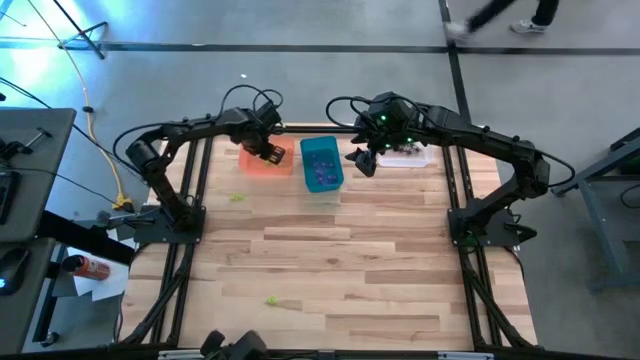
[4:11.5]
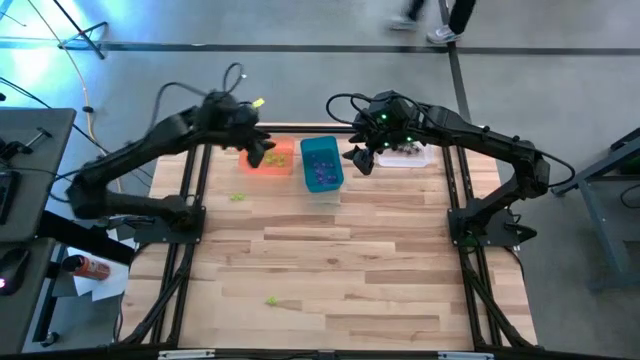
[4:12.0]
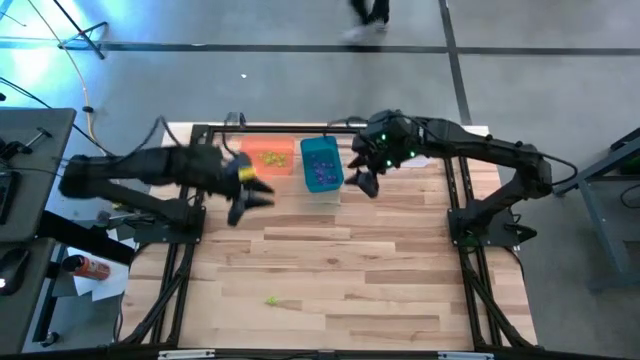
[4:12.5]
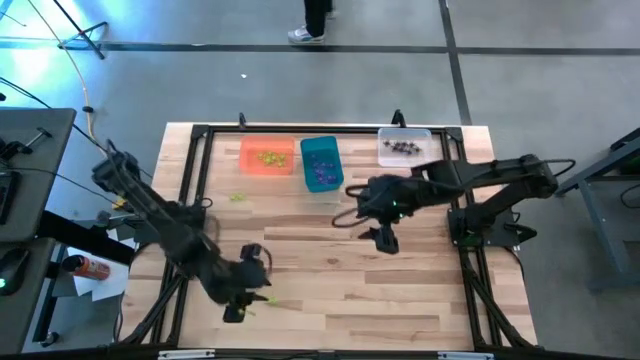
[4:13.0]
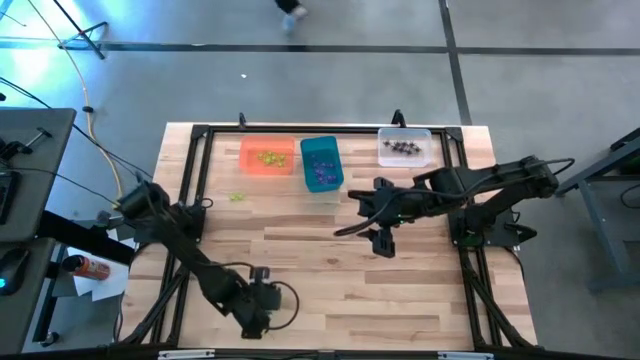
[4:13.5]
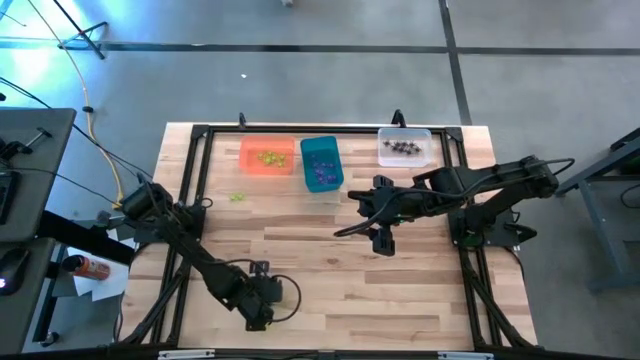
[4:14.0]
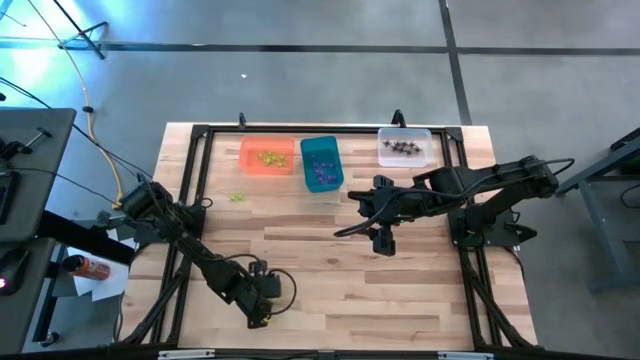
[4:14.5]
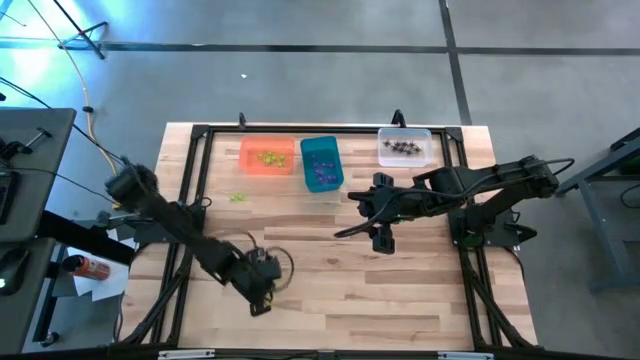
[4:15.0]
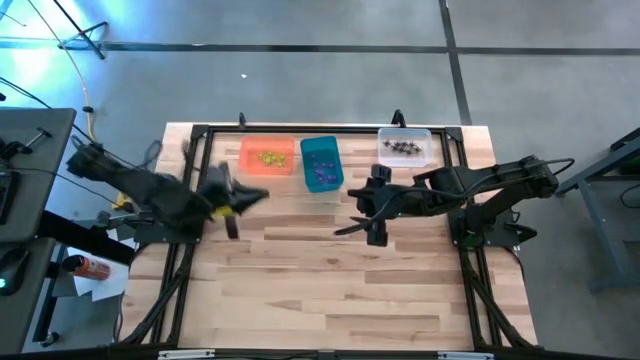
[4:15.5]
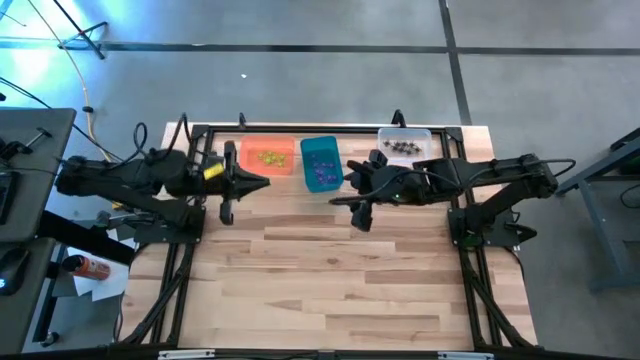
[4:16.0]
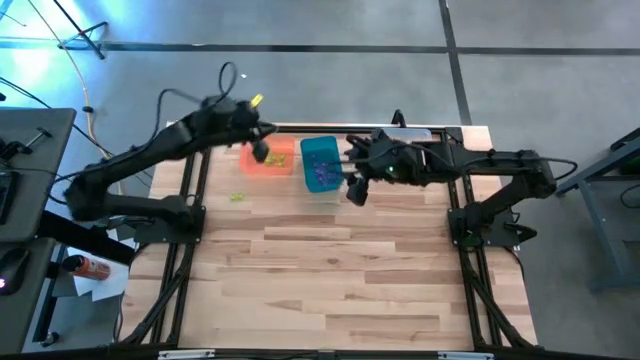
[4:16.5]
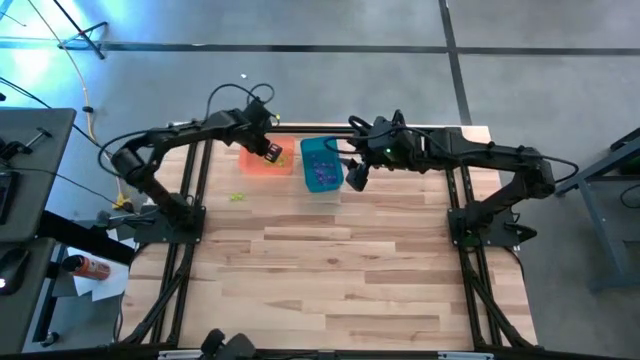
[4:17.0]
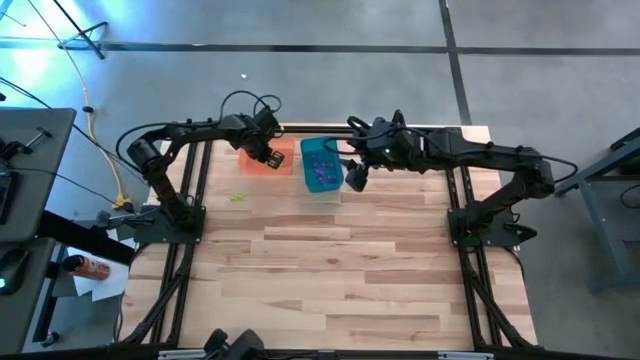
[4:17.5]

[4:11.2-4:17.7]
Task: Sort Halloween decoration
Put the green spider toy into the orange bin

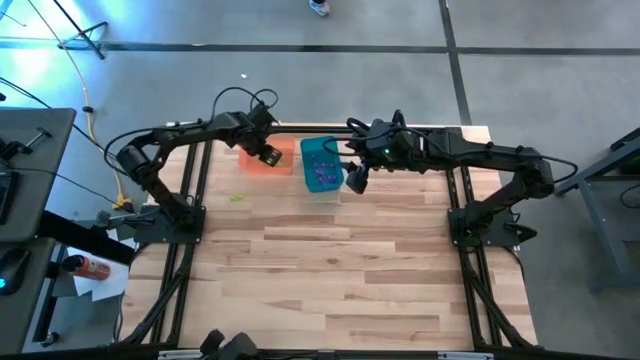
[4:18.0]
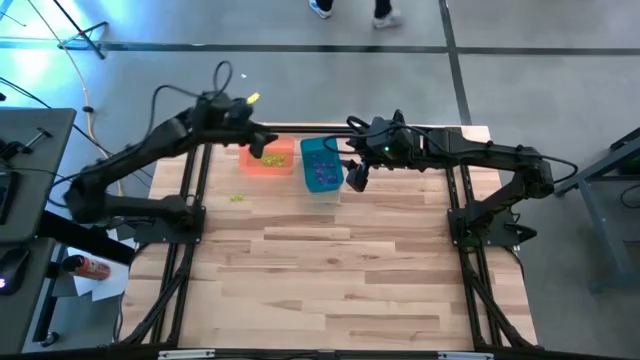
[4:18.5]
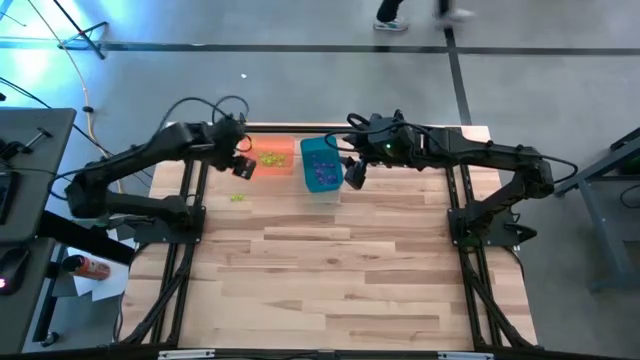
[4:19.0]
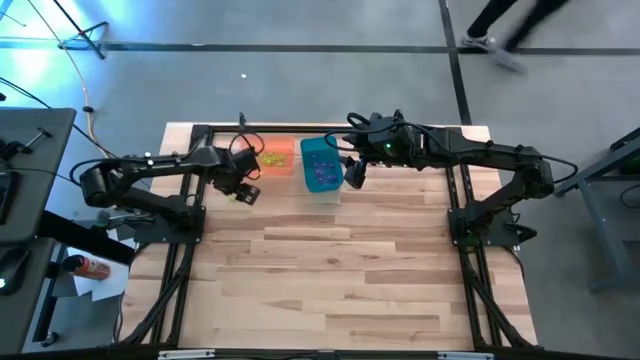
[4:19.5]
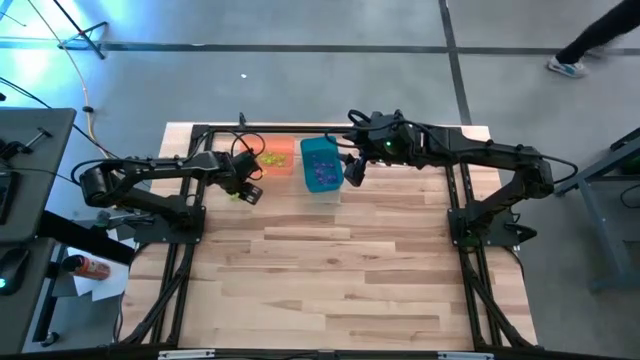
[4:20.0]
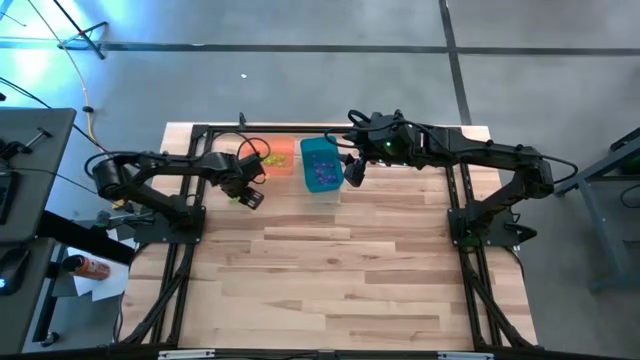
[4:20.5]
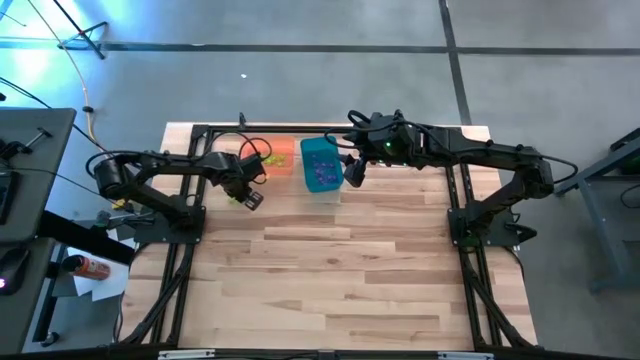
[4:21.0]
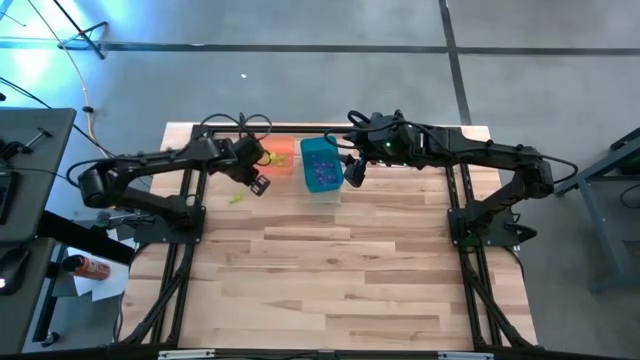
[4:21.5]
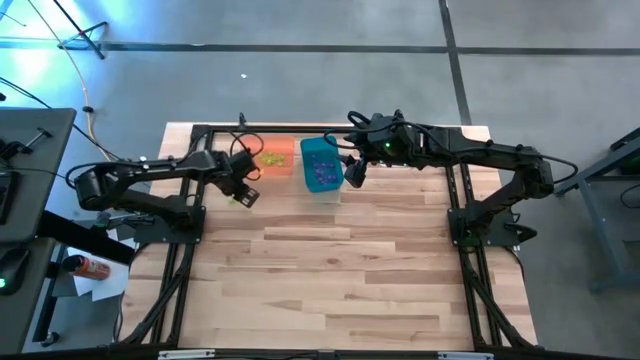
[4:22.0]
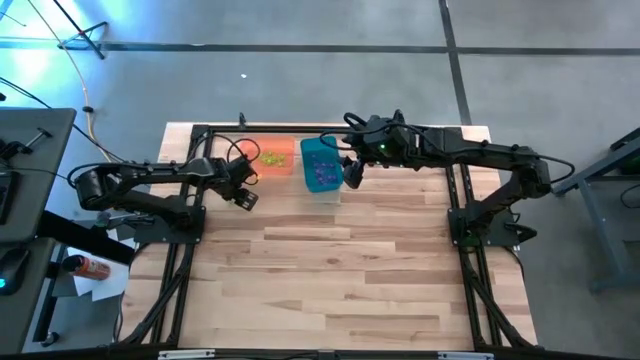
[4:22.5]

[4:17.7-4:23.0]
Put the green spider toy into the orange bin

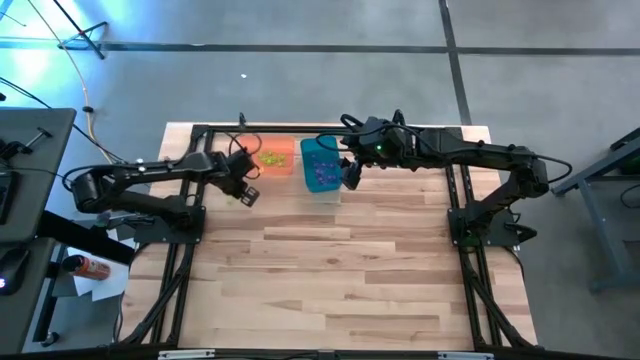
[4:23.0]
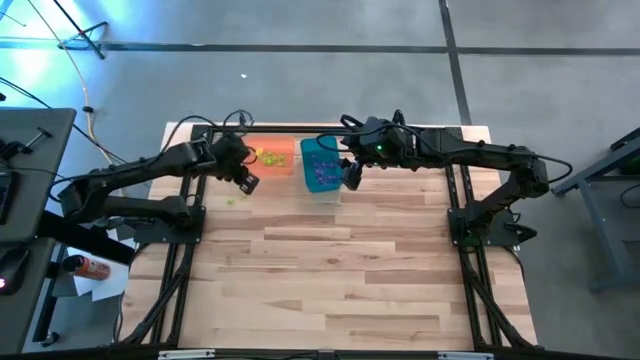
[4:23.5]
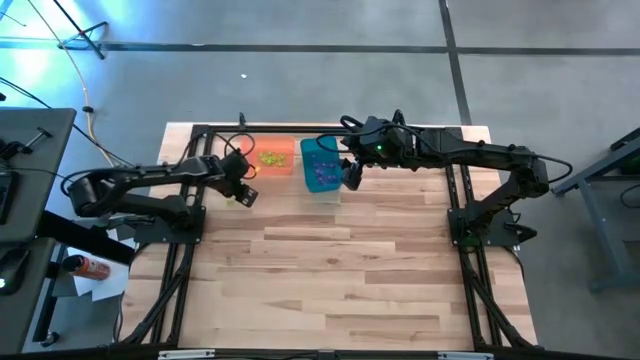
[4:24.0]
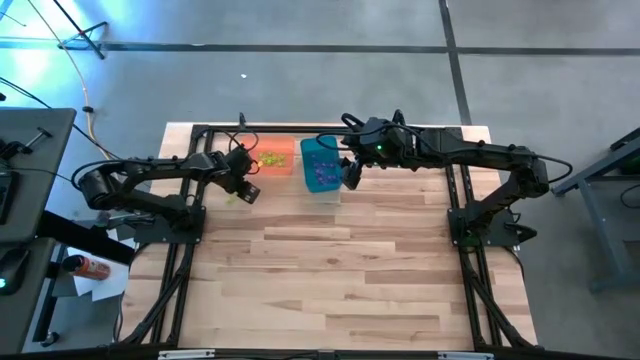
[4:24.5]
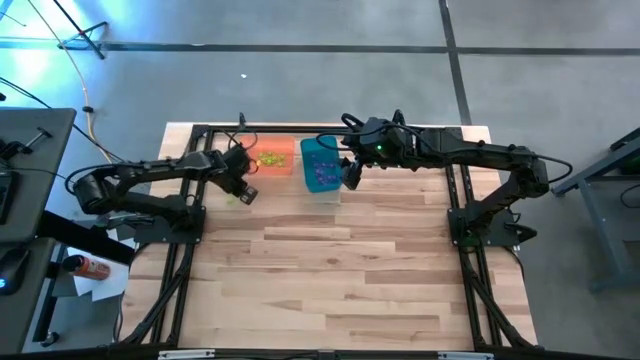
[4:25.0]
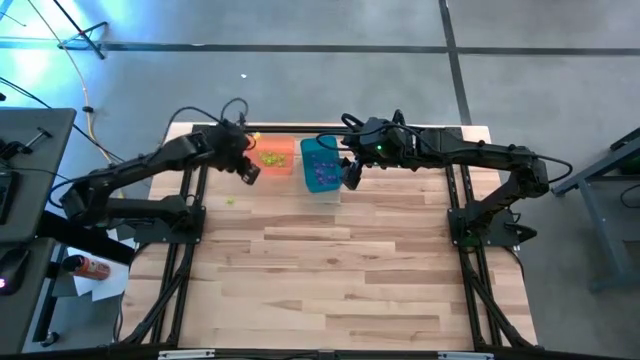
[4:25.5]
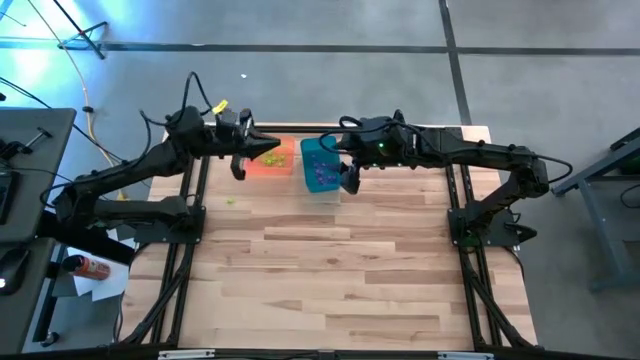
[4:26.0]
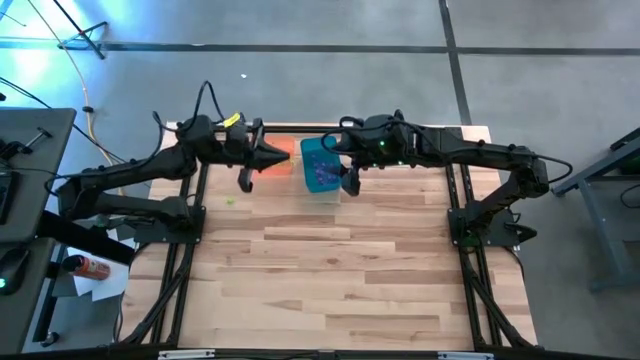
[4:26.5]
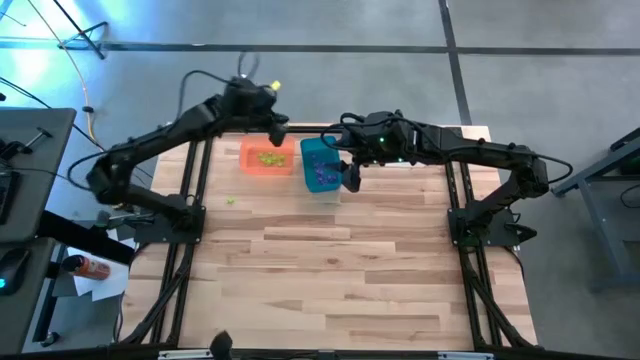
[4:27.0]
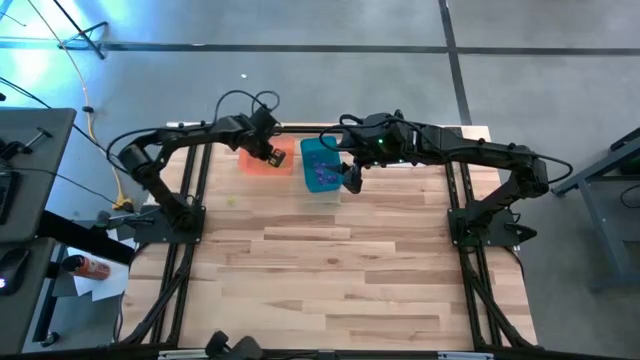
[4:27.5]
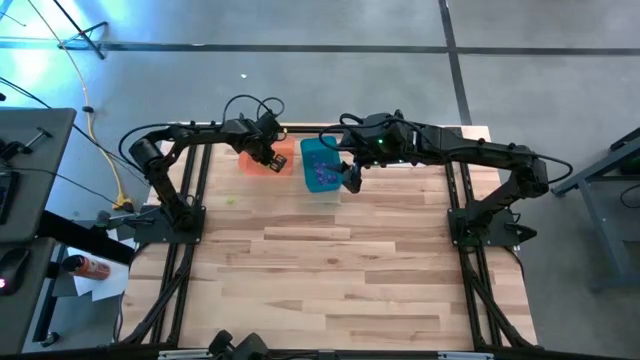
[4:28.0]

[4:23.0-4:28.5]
Put the green spider toy into the orange bin

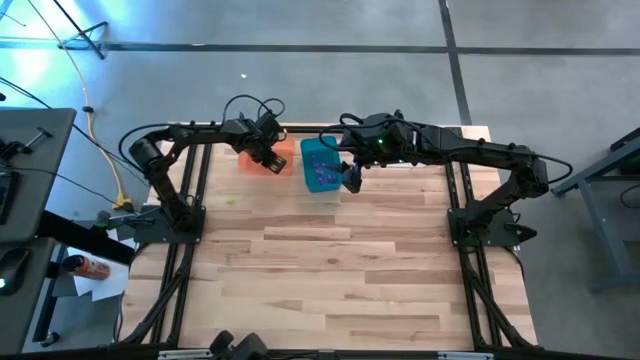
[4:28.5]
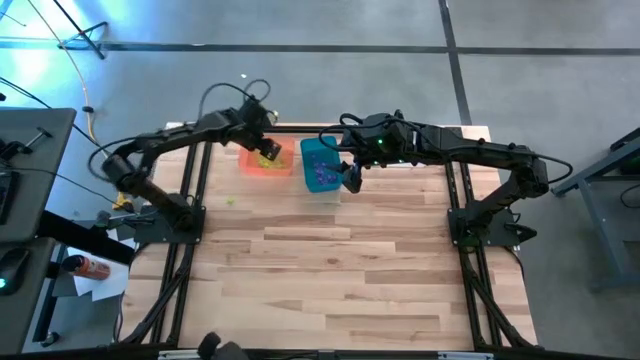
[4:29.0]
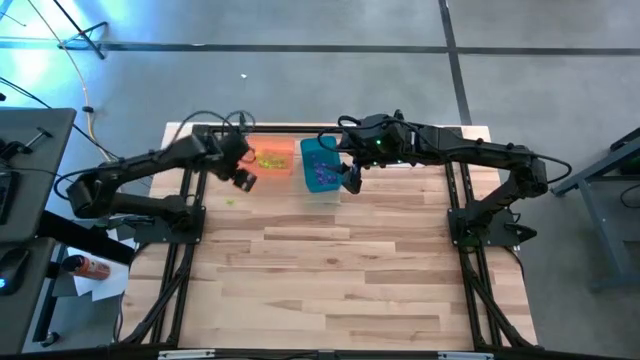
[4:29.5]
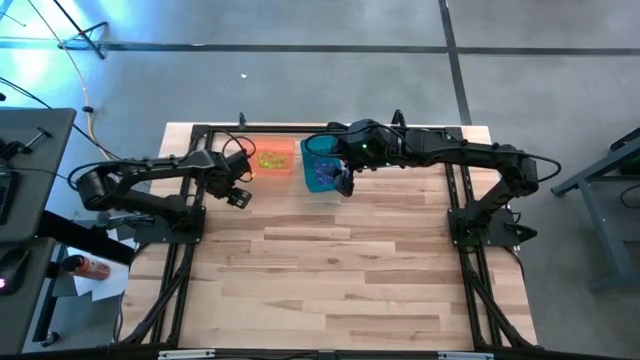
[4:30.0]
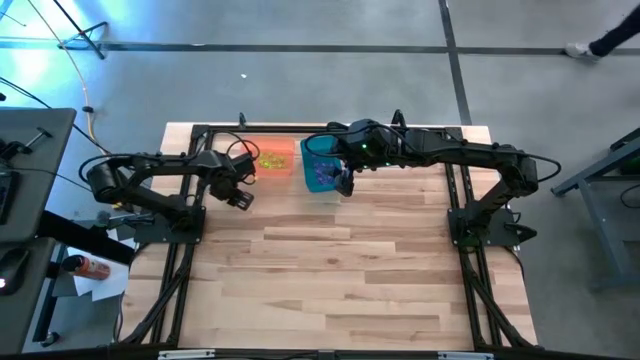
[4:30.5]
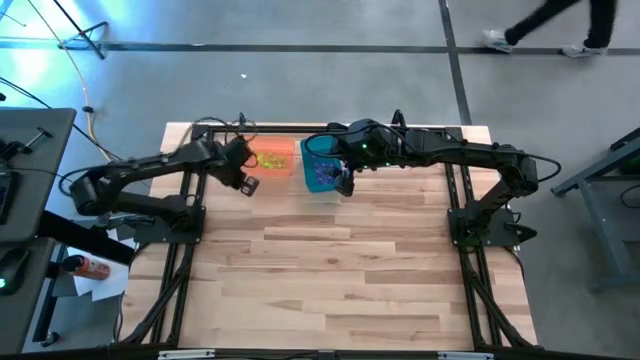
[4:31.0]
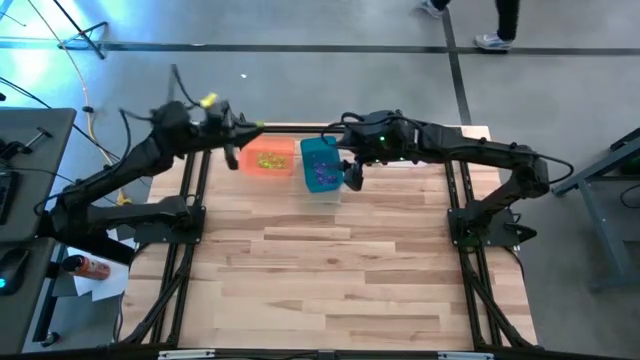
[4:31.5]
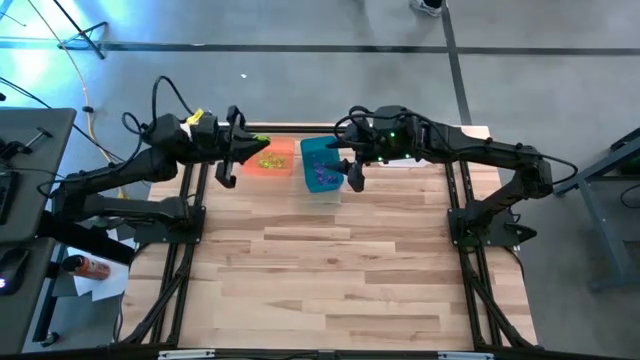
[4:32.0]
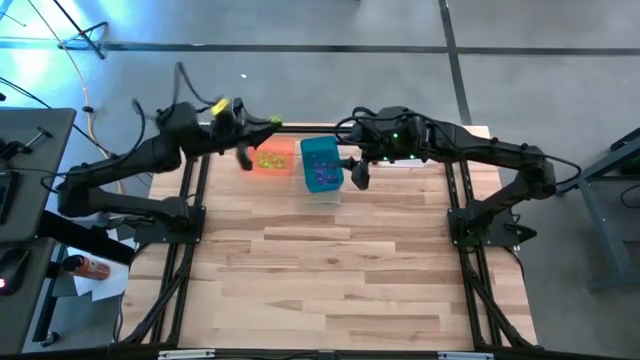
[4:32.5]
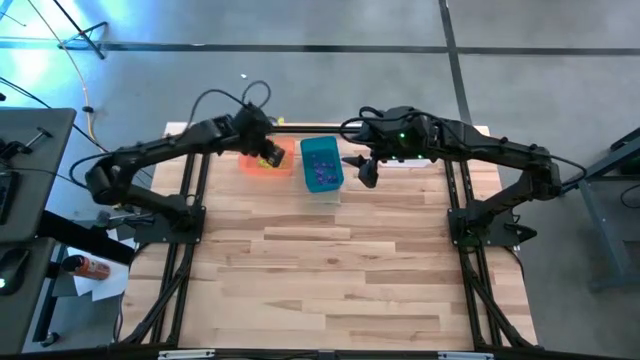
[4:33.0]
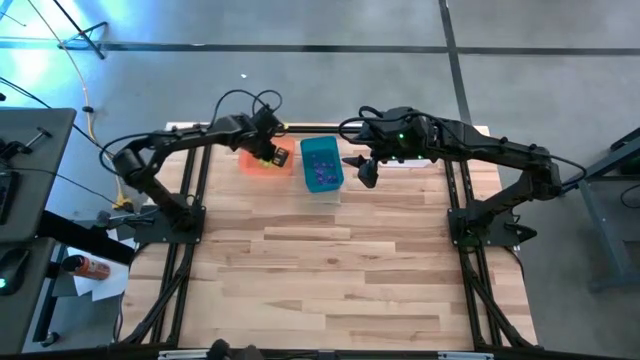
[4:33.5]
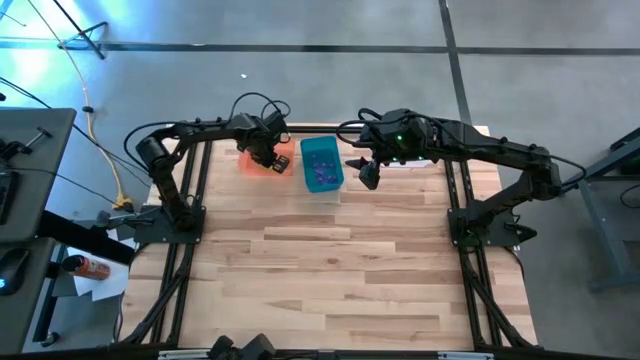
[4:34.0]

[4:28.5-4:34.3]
Put the green spider toy into the orange bin
